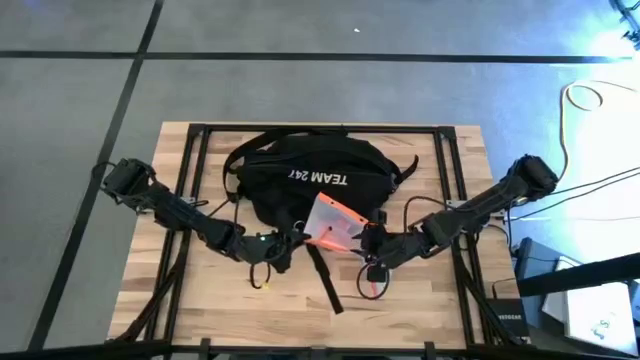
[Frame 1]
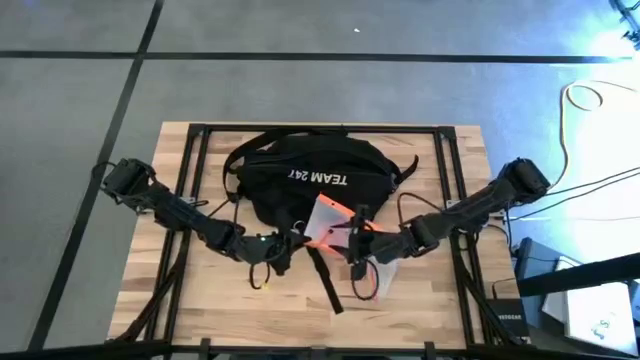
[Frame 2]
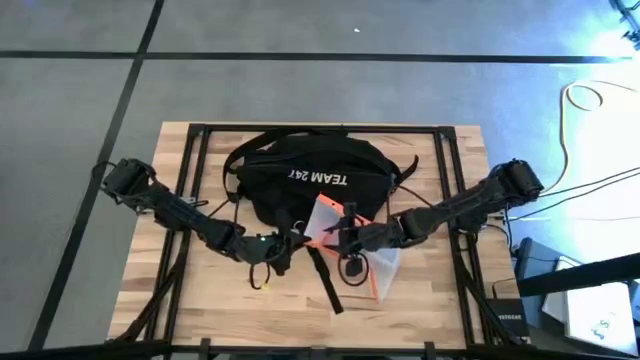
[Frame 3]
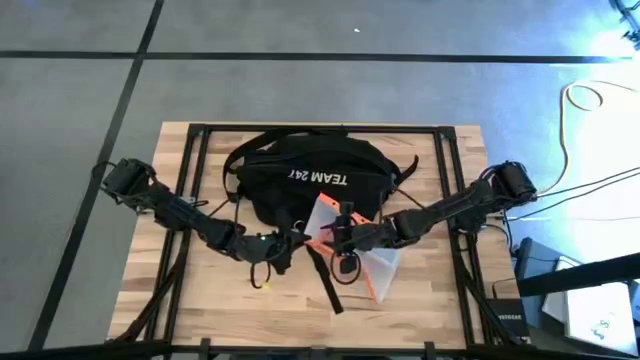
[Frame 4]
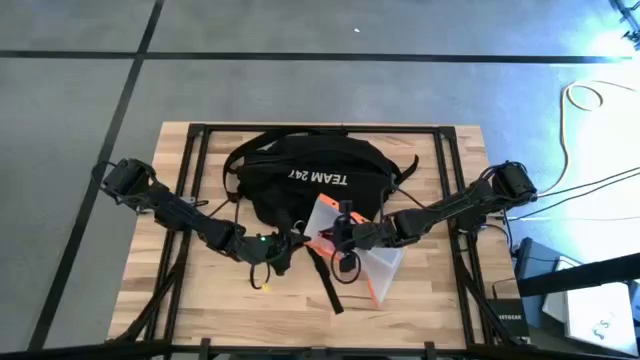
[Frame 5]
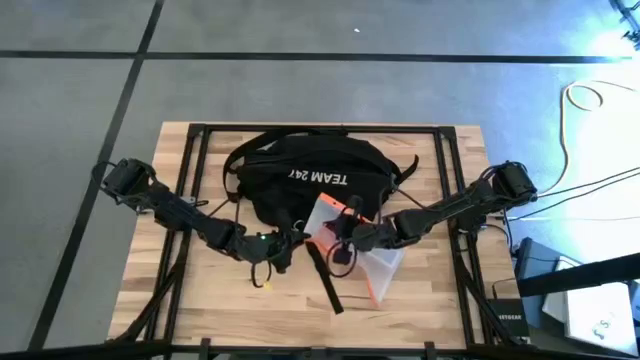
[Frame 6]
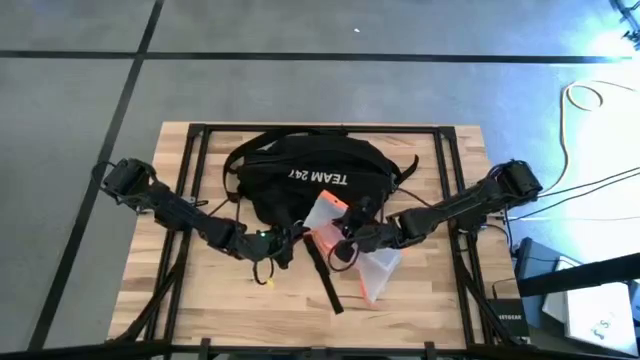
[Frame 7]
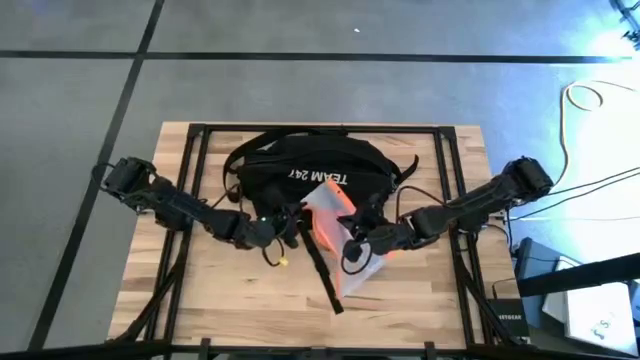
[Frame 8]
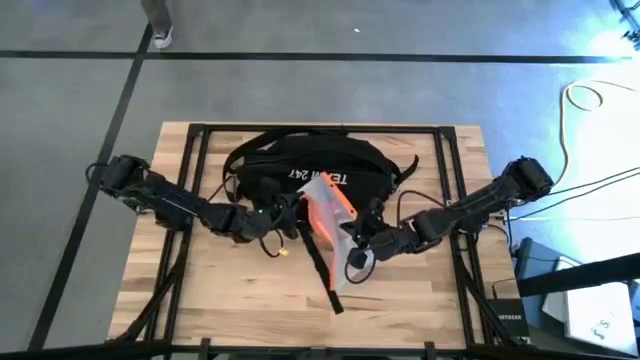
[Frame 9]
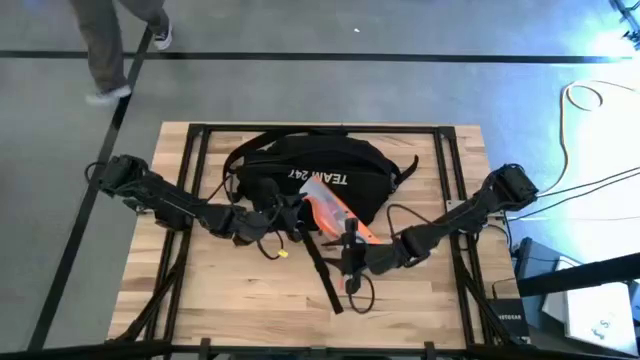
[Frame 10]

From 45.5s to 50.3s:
Task: Unpack backpack
Open the white zip bag

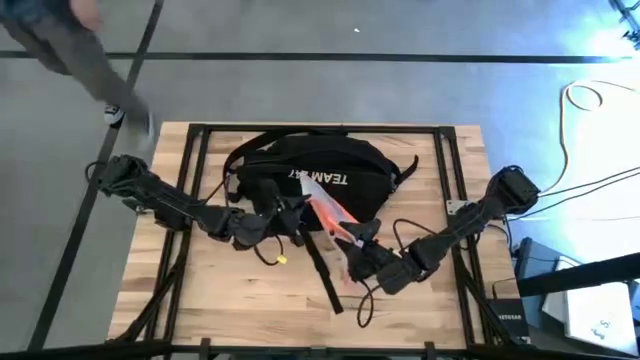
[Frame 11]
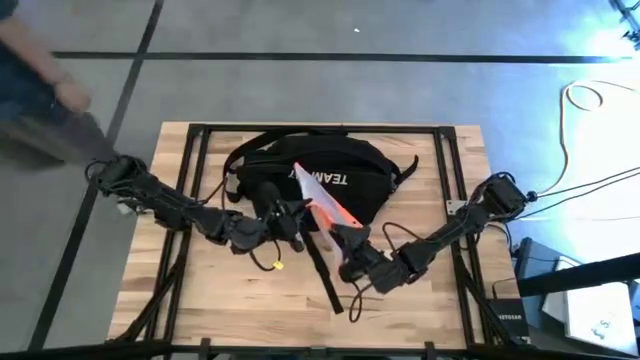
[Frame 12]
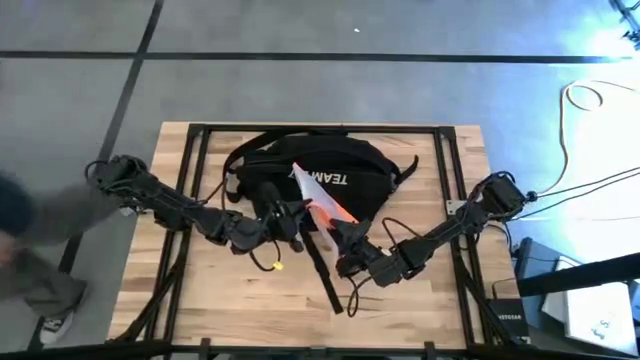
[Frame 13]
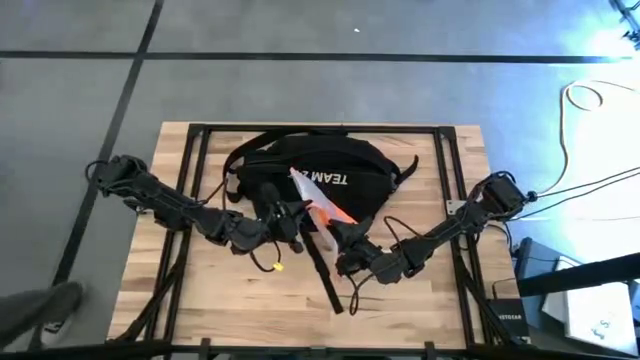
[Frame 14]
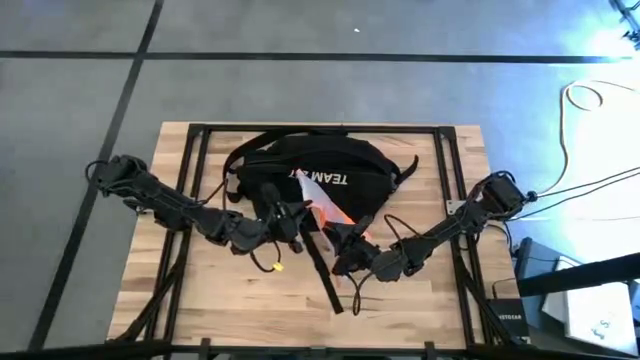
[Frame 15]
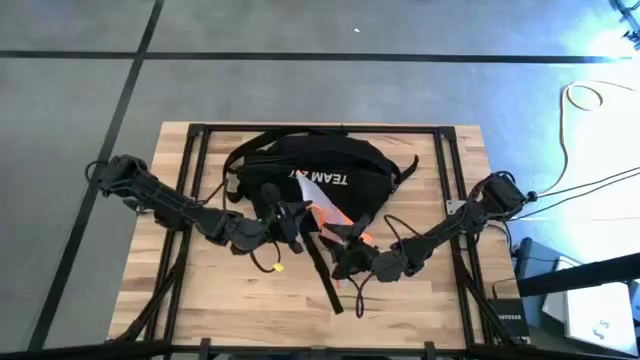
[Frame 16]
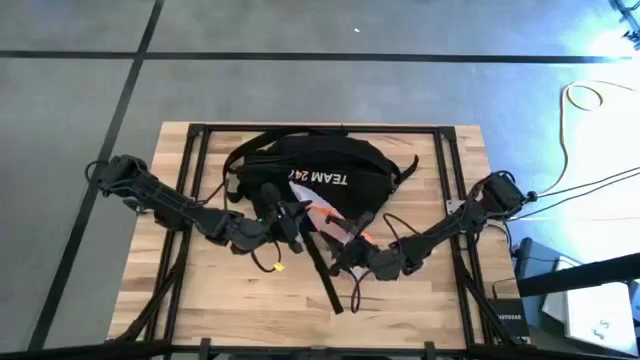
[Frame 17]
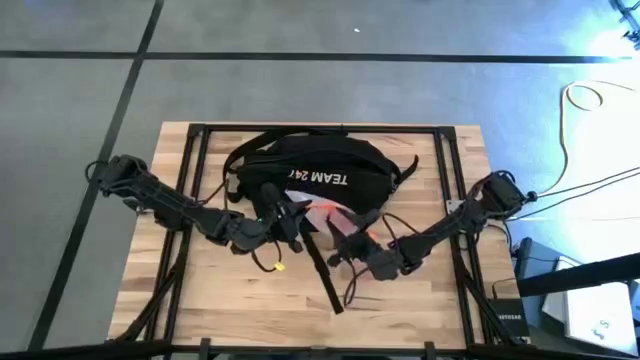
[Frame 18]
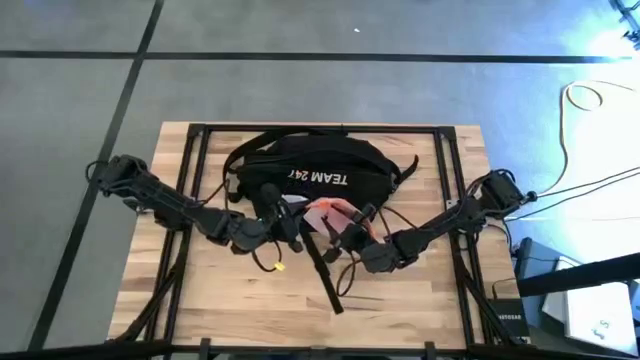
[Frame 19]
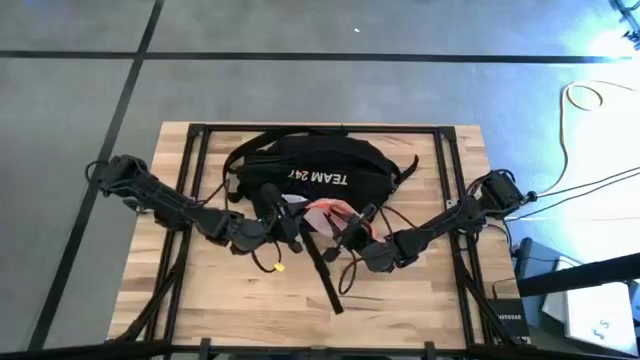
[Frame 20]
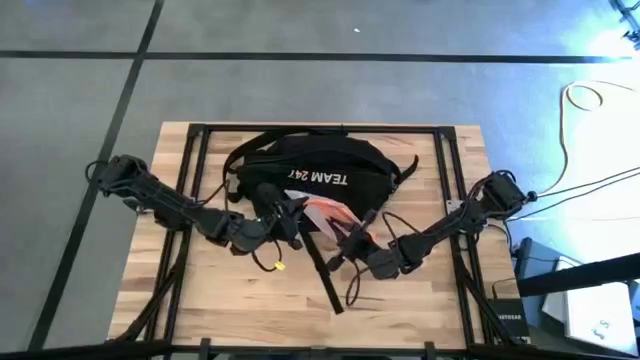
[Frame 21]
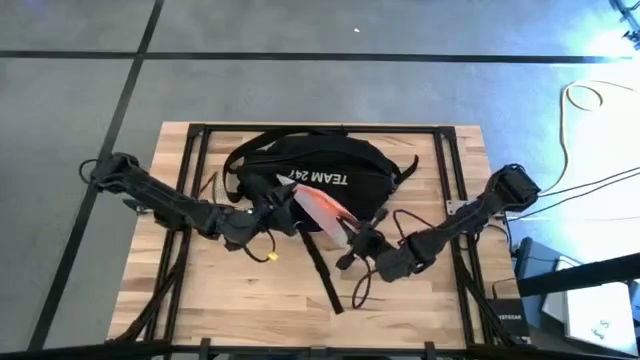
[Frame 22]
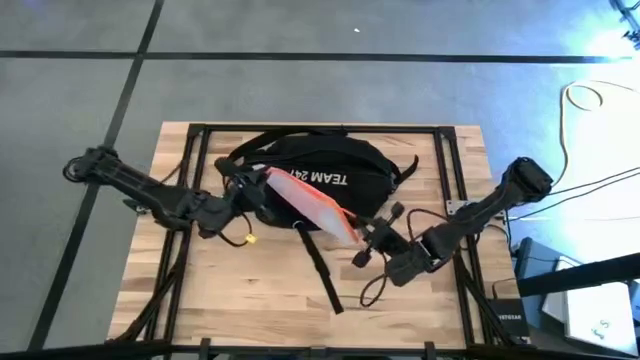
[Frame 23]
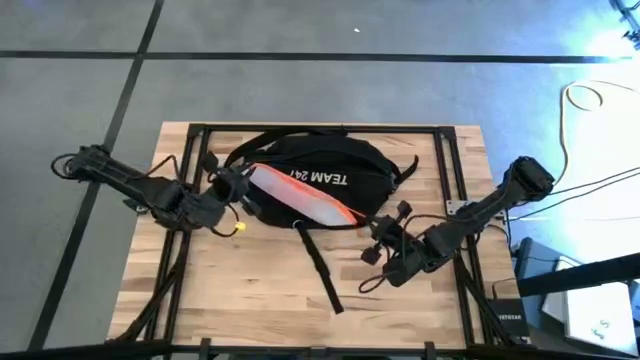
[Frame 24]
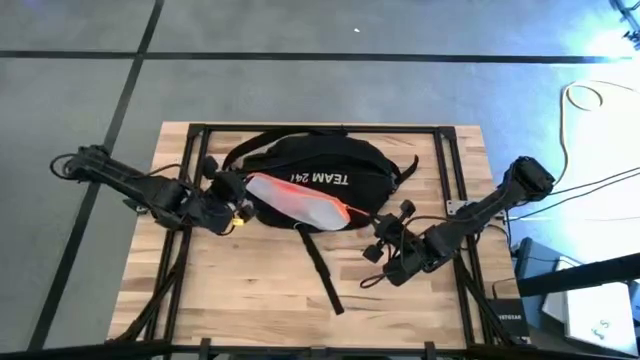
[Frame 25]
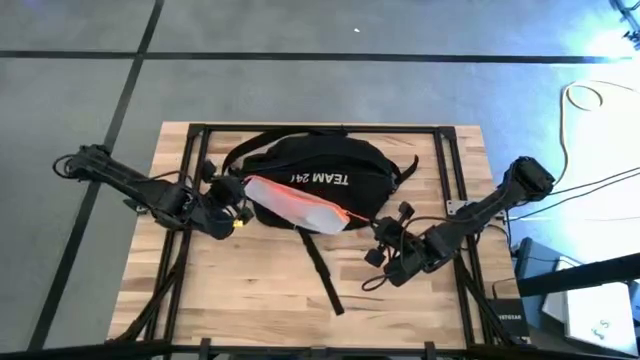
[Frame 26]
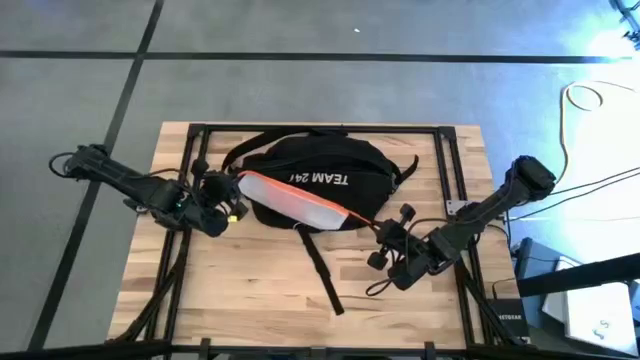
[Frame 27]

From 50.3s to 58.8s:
Open the white zip bag

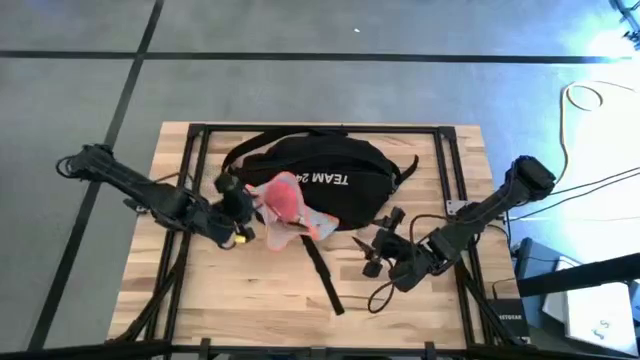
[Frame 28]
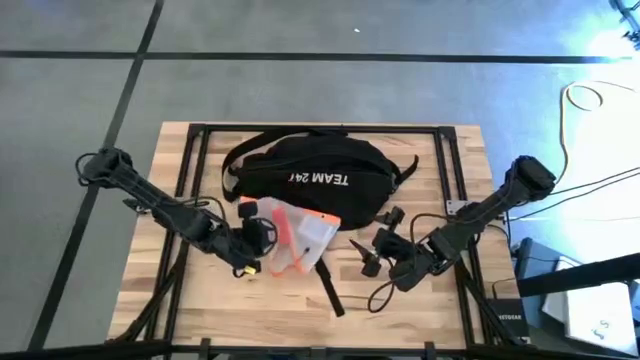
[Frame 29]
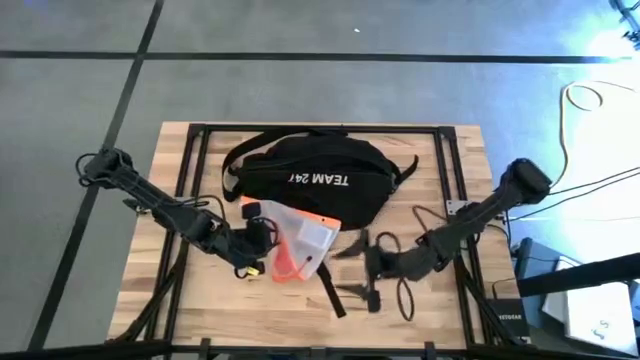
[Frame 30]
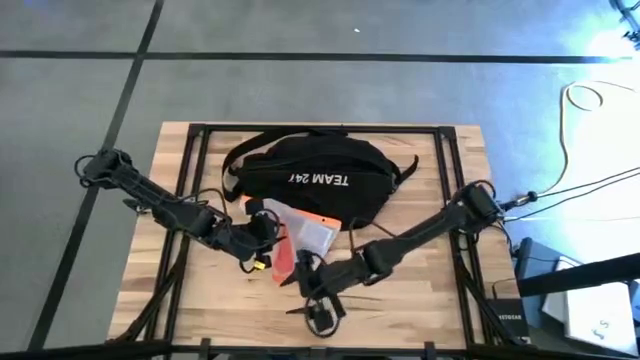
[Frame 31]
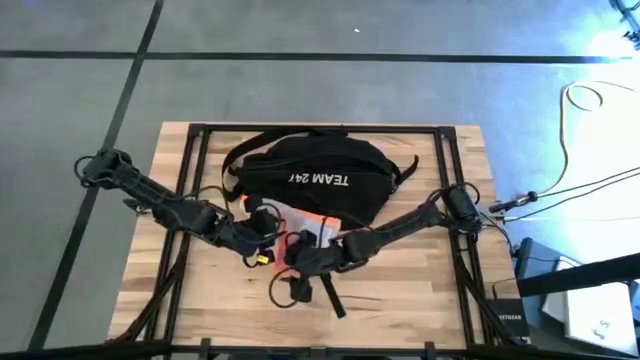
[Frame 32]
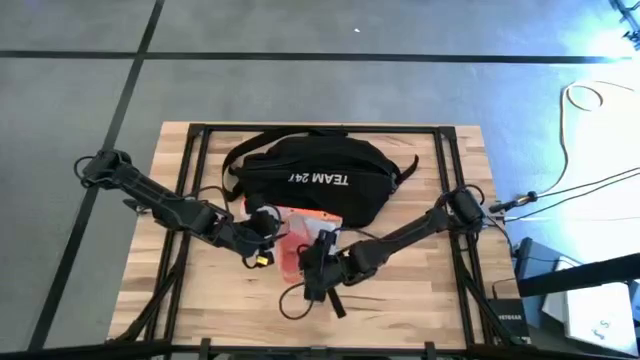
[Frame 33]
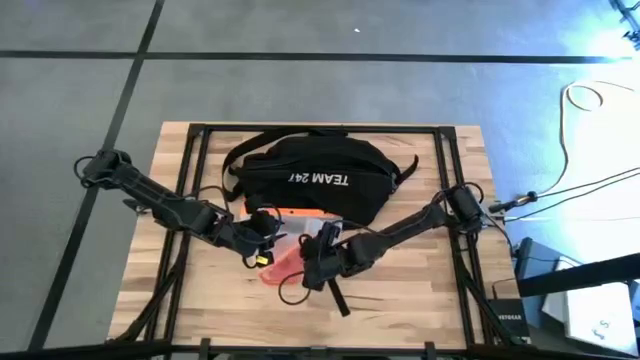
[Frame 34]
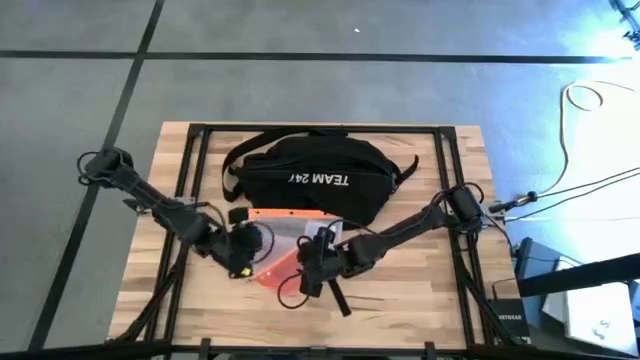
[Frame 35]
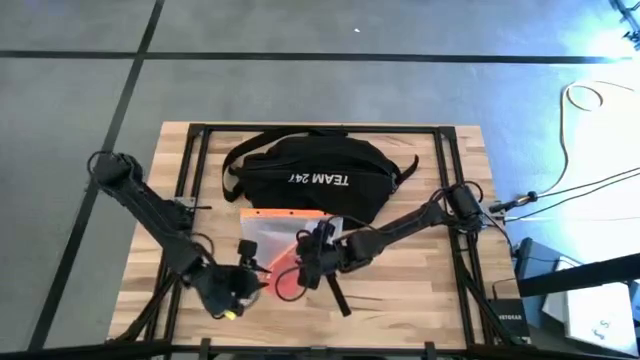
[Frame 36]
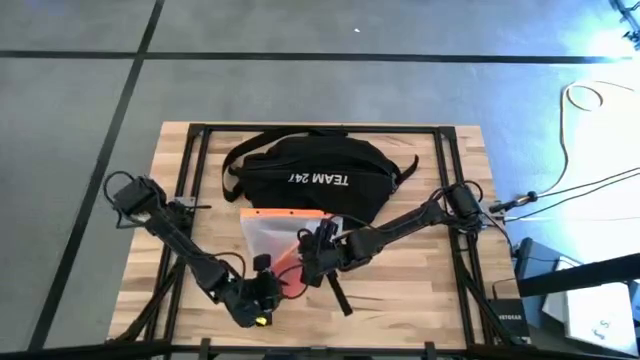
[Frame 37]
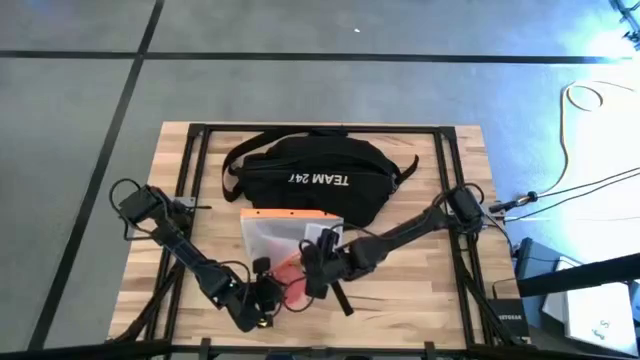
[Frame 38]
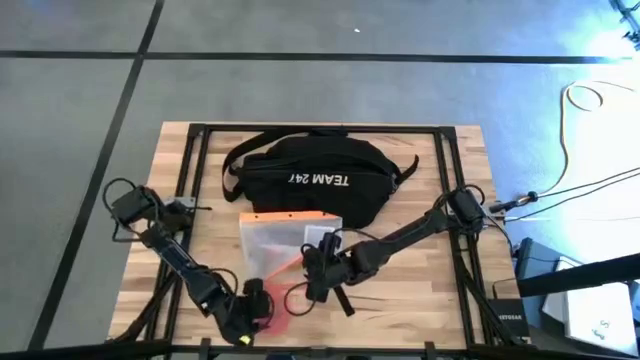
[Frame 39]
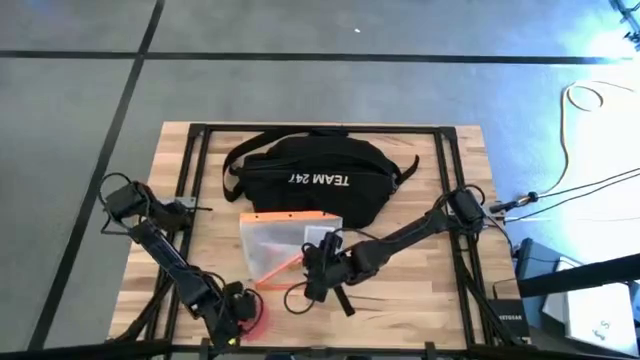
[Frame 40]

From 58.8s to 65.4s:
Remove the medicine organizer from the white zip bag
